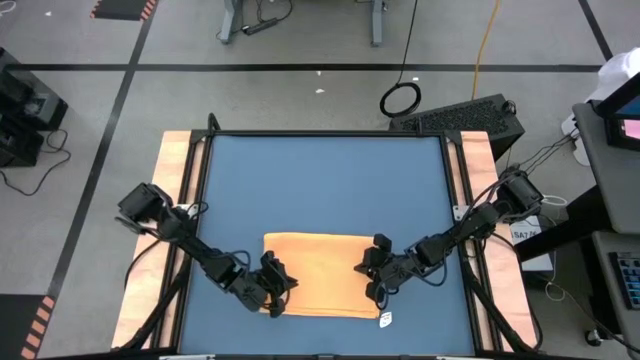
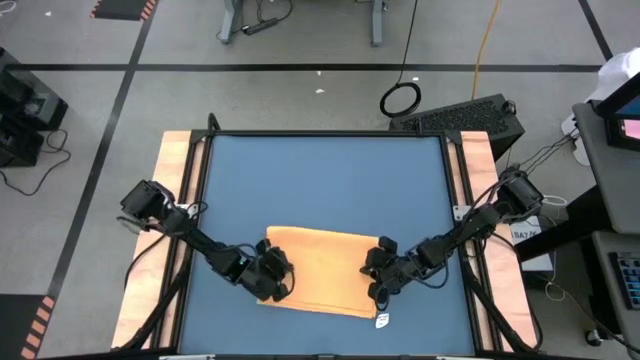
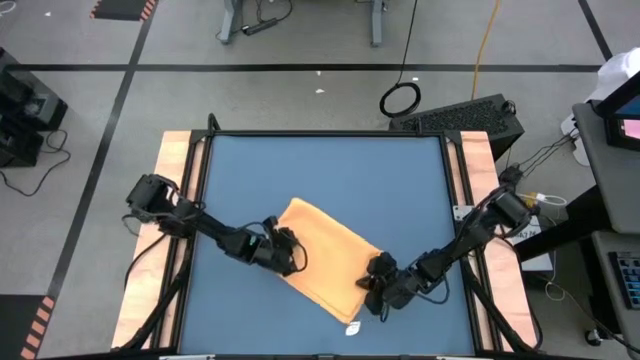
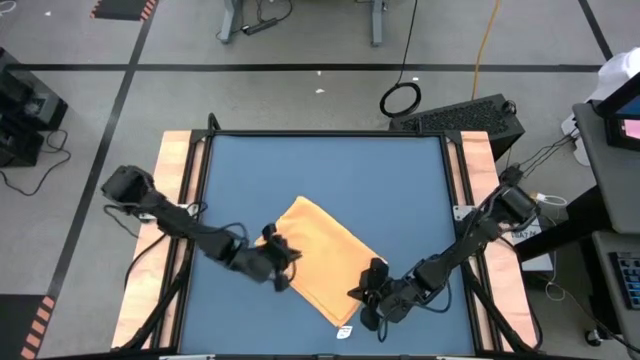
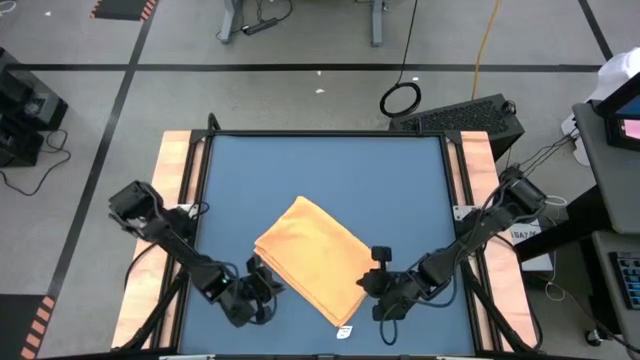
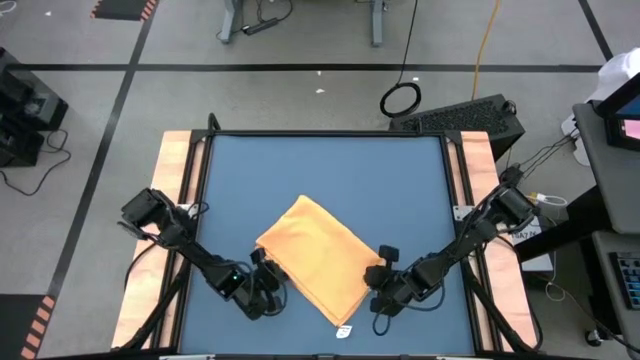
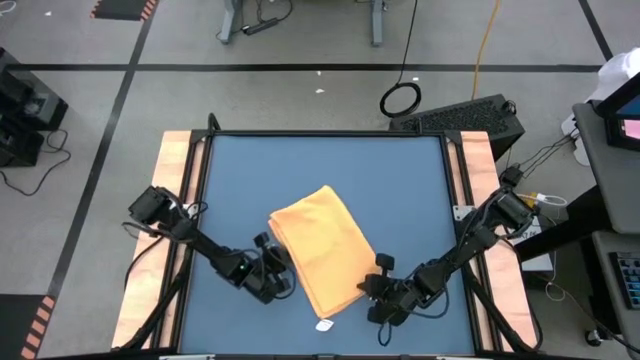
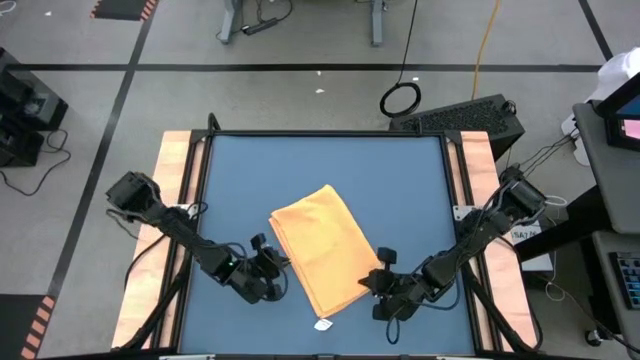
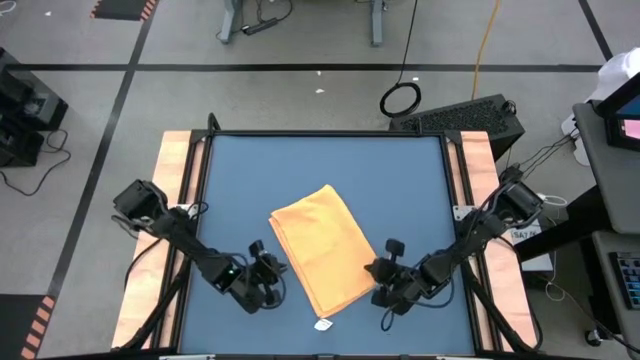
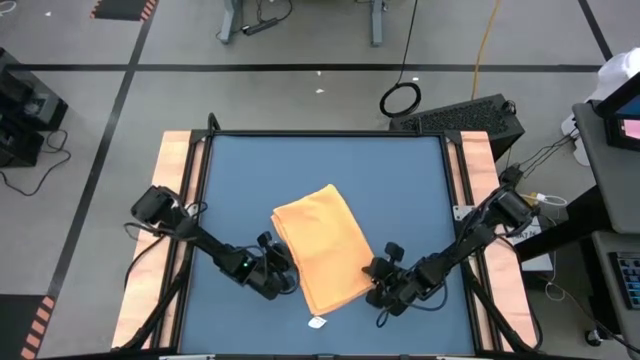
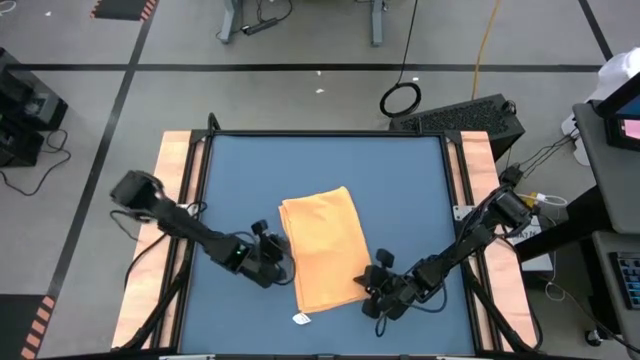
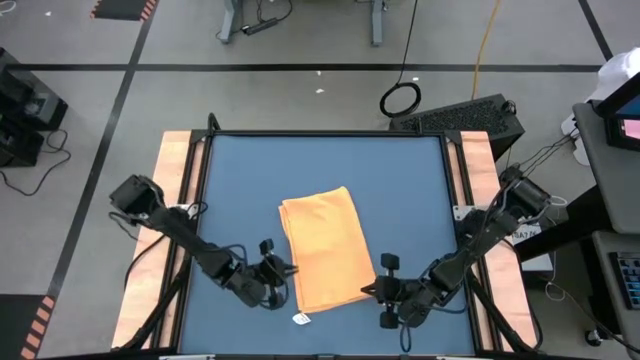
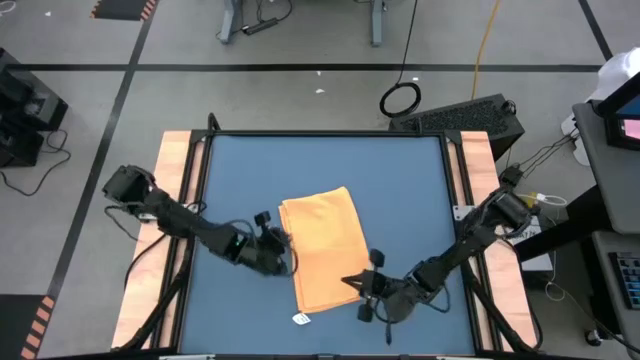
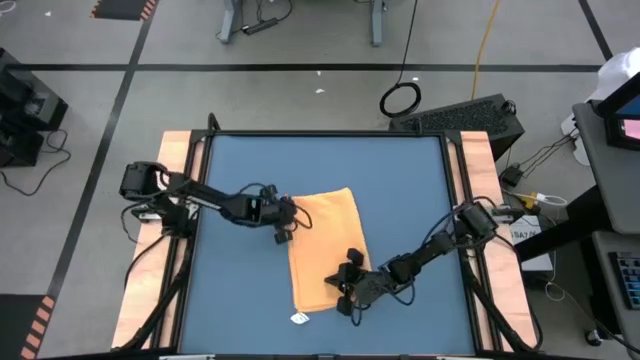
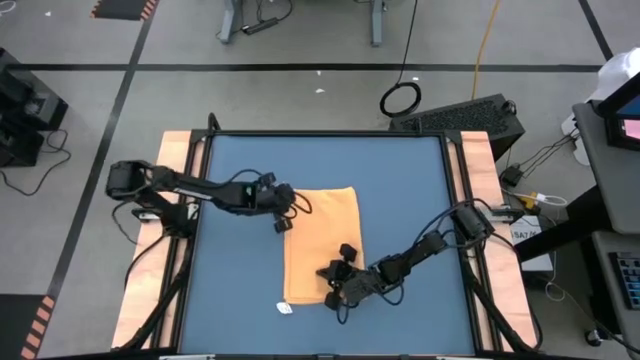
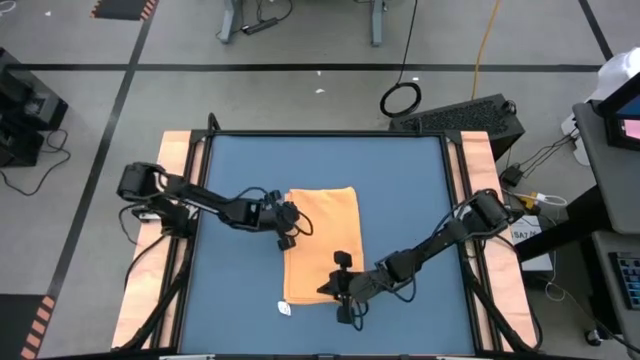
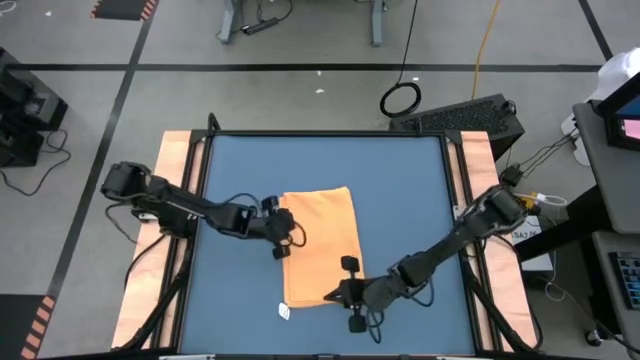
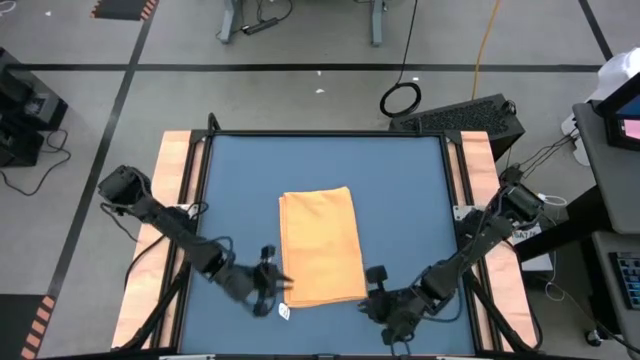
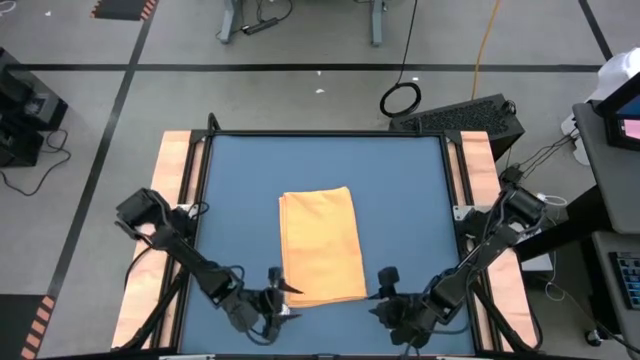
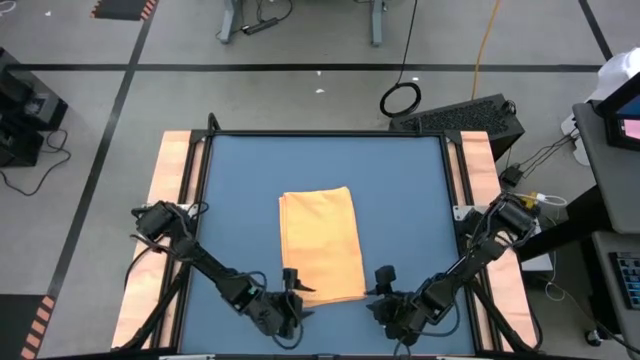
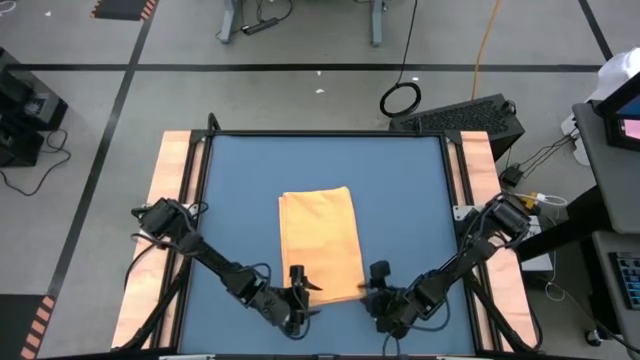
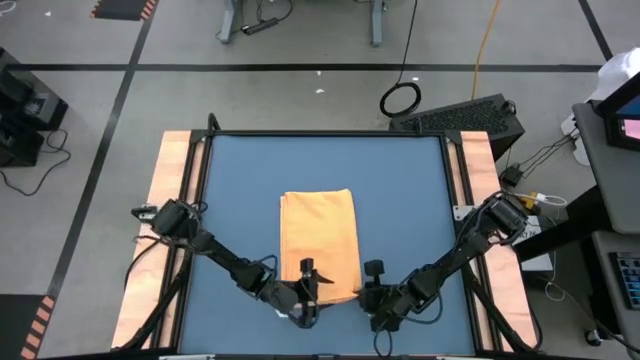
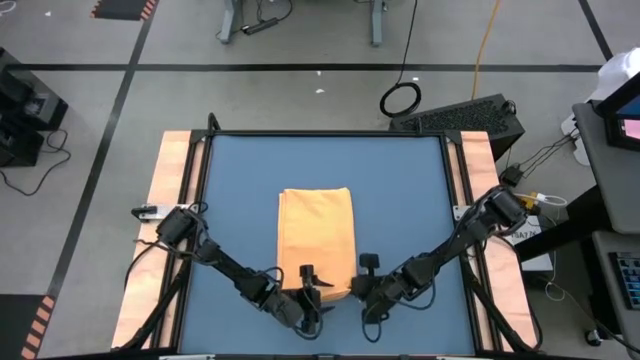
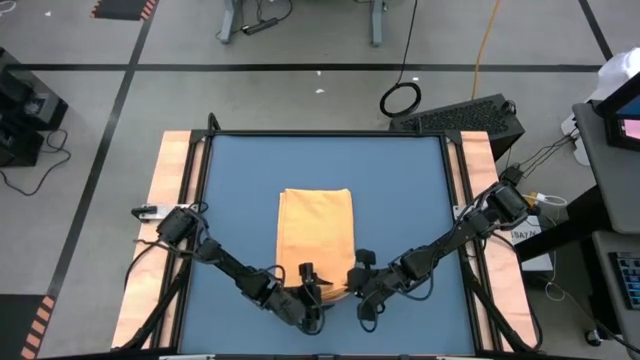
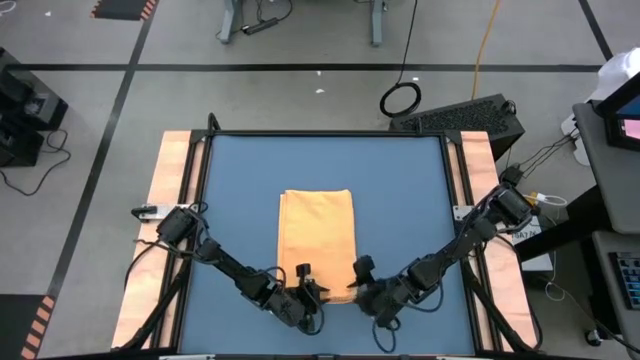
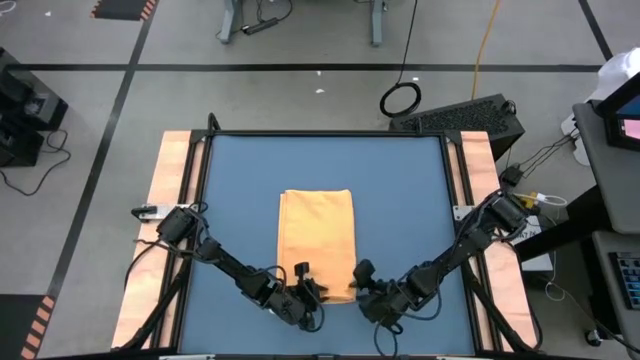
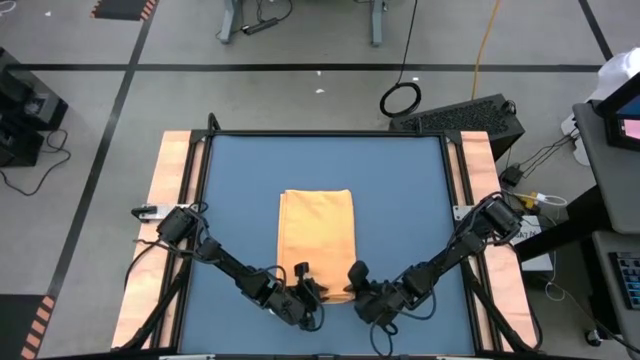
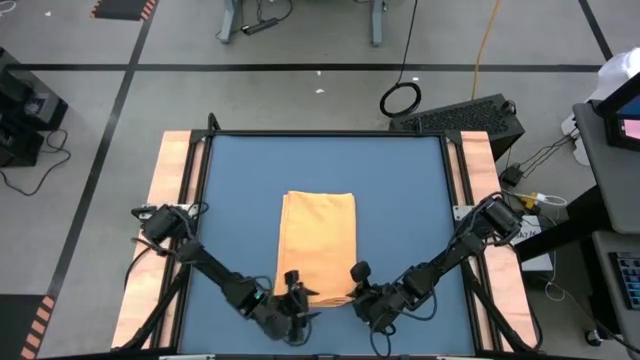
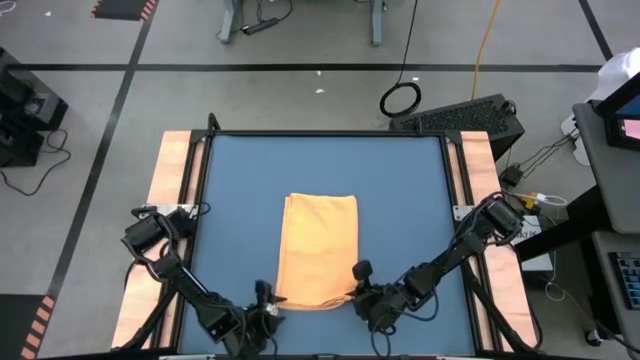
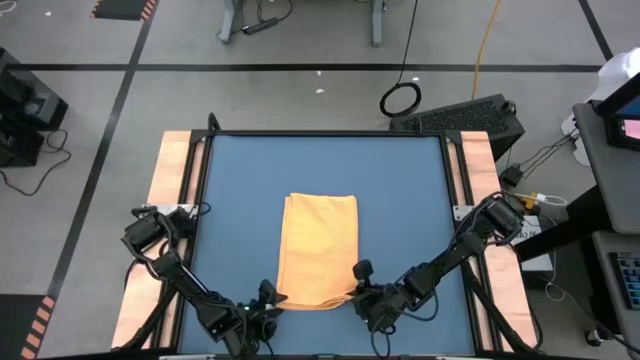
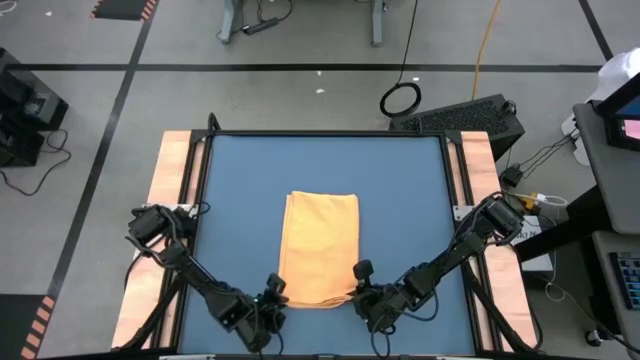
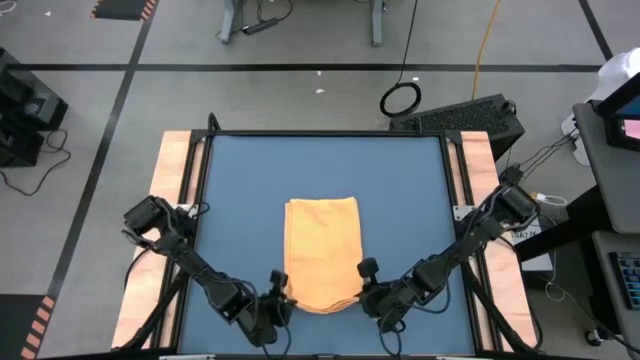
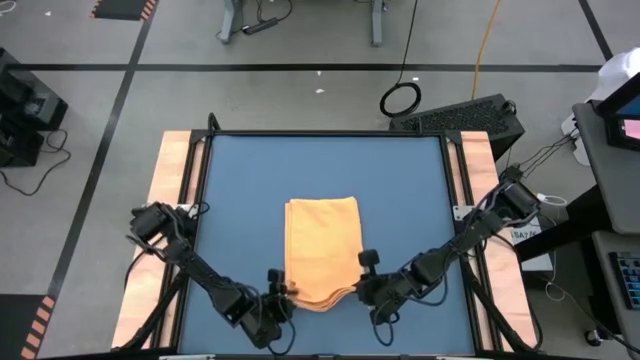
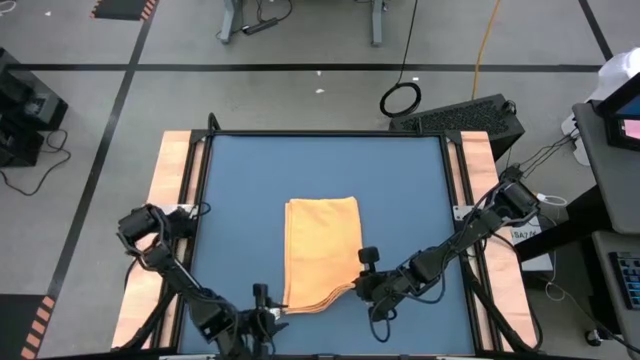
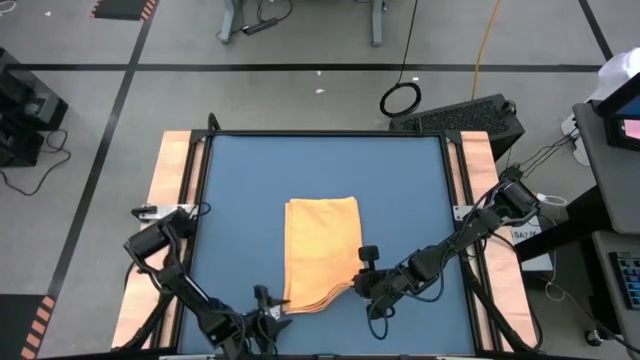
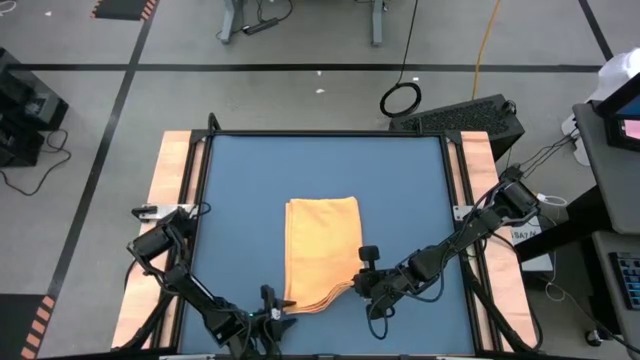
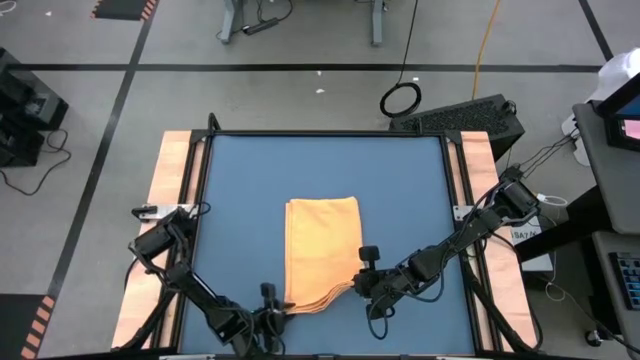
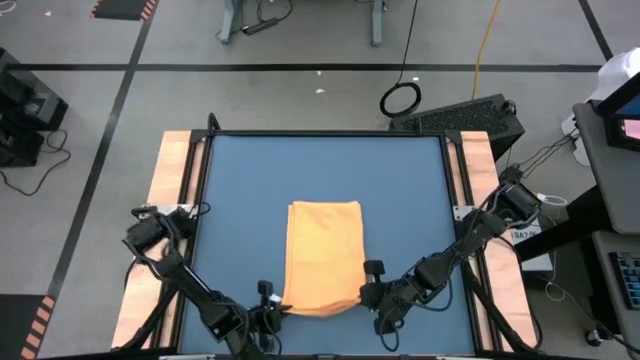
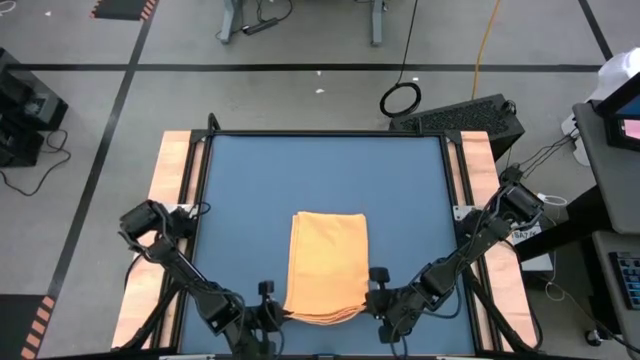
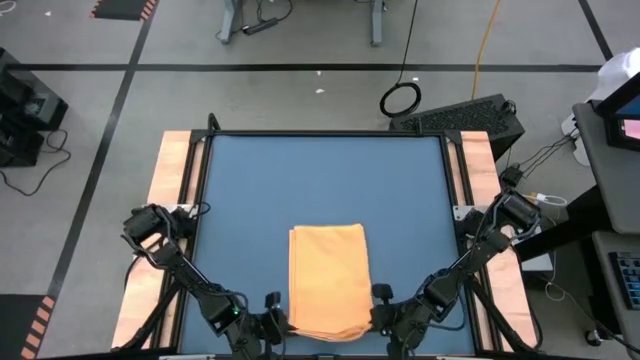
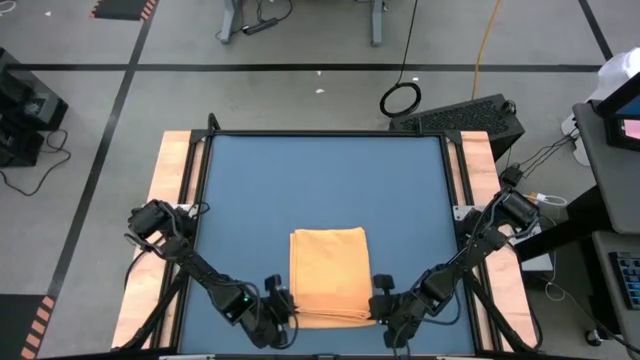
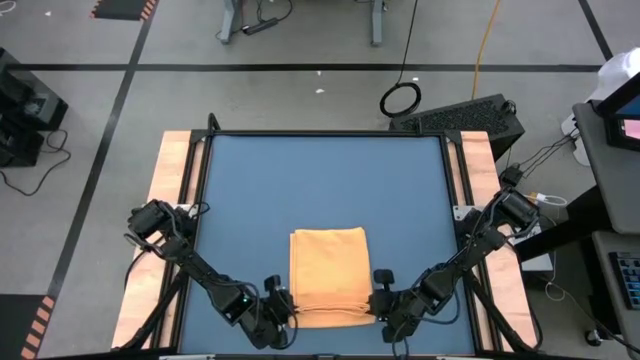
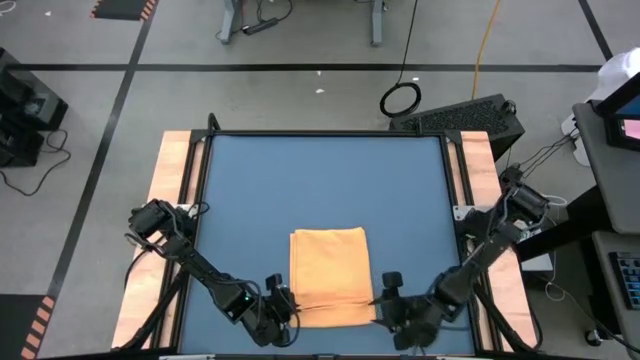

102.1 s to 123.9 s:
Task: Roll towel
Roll the yellow towel
